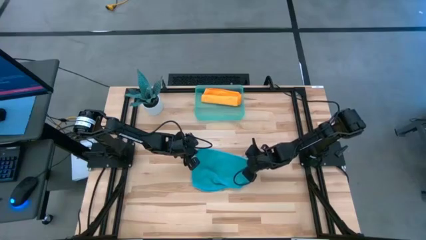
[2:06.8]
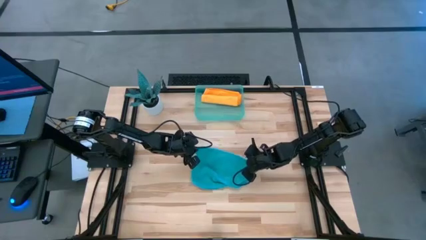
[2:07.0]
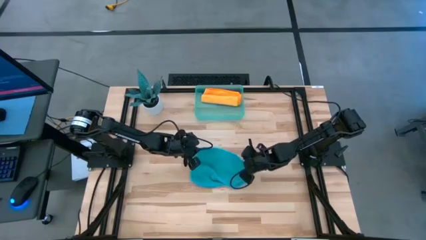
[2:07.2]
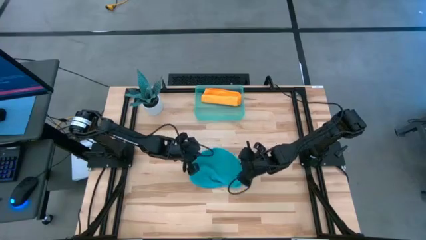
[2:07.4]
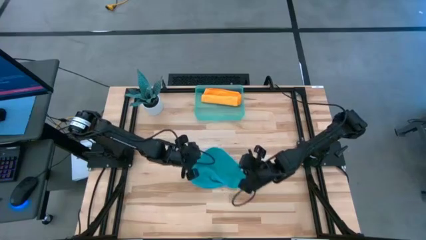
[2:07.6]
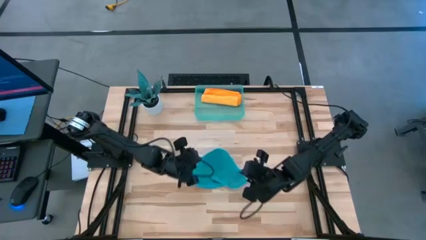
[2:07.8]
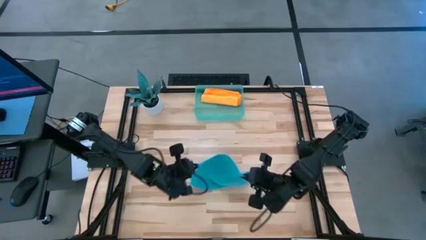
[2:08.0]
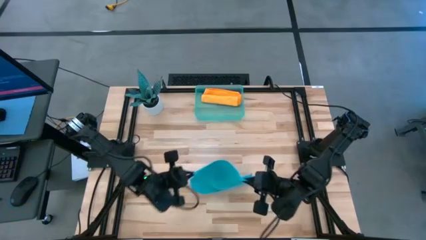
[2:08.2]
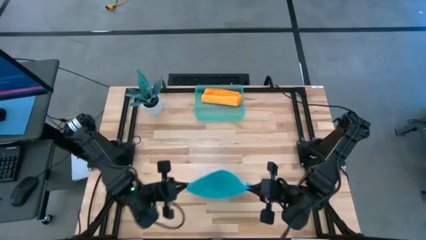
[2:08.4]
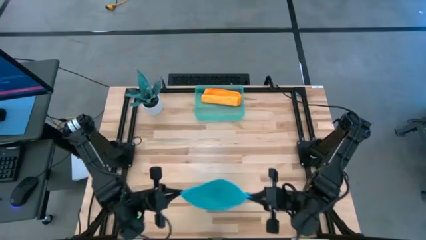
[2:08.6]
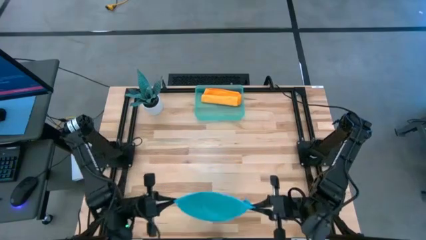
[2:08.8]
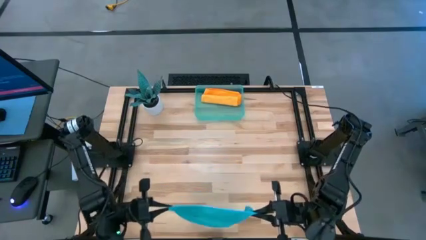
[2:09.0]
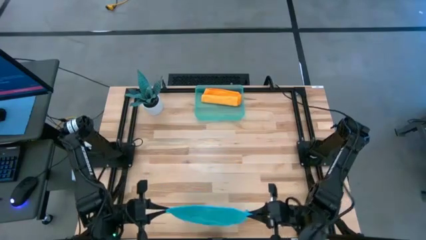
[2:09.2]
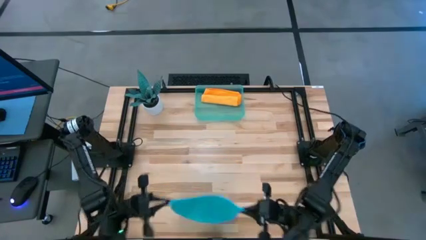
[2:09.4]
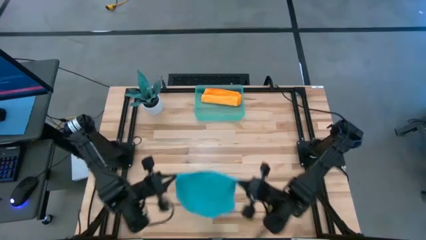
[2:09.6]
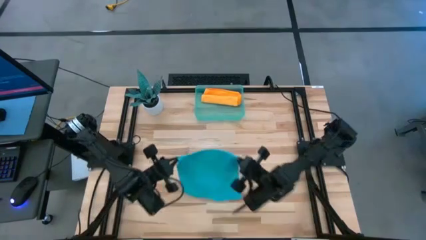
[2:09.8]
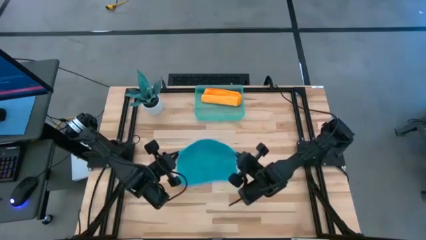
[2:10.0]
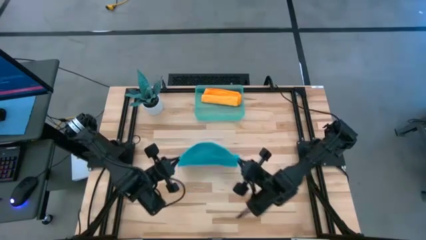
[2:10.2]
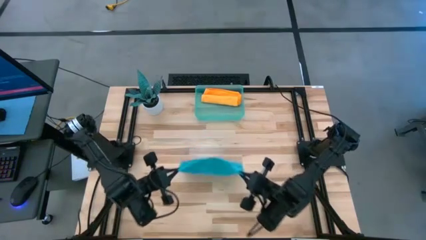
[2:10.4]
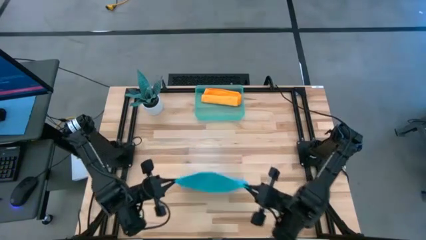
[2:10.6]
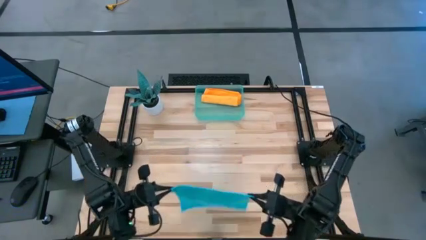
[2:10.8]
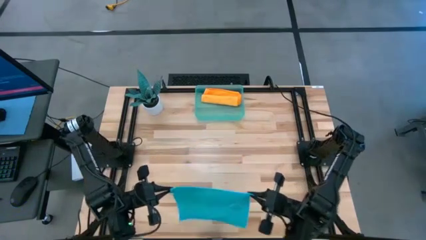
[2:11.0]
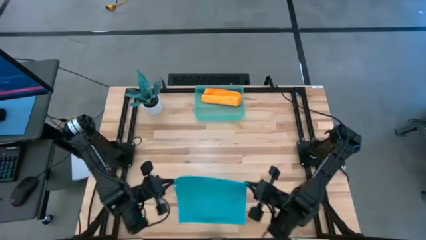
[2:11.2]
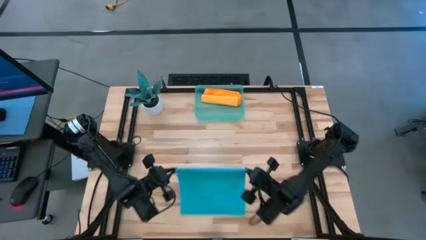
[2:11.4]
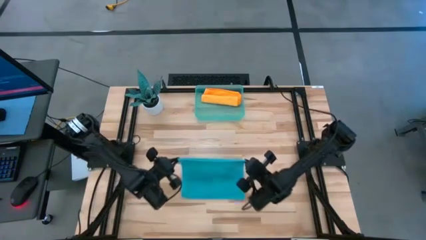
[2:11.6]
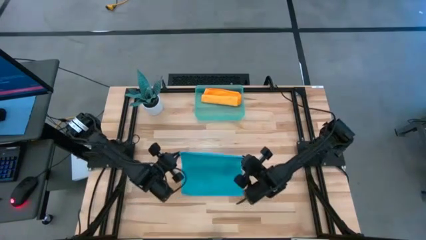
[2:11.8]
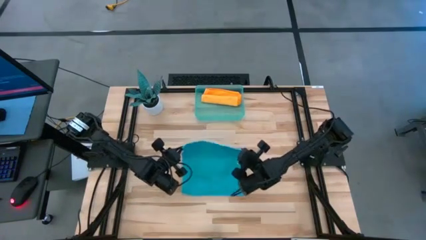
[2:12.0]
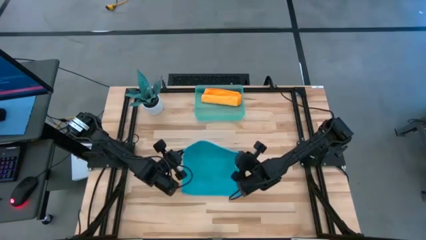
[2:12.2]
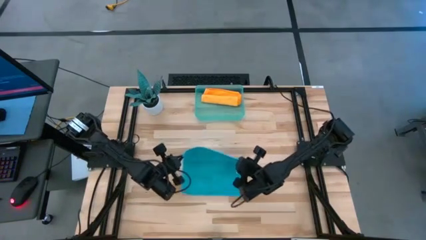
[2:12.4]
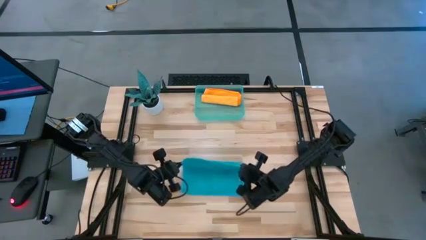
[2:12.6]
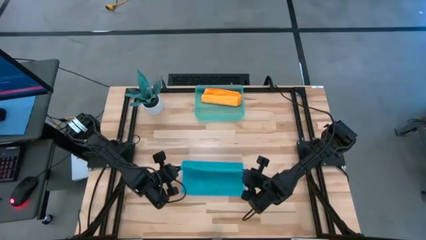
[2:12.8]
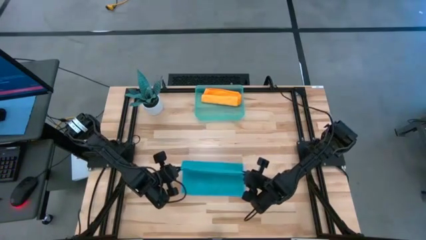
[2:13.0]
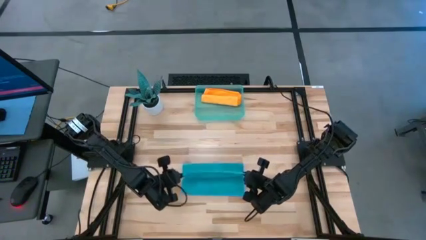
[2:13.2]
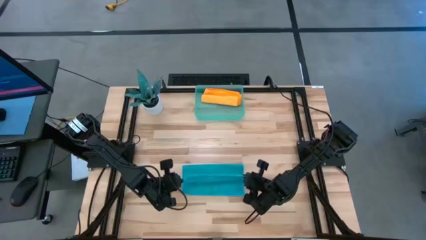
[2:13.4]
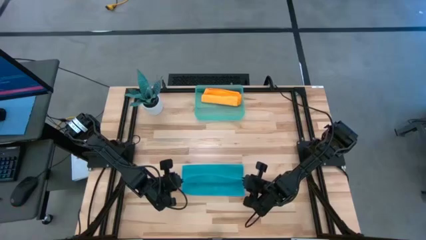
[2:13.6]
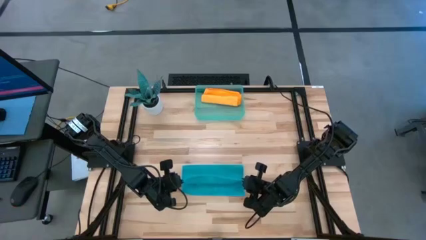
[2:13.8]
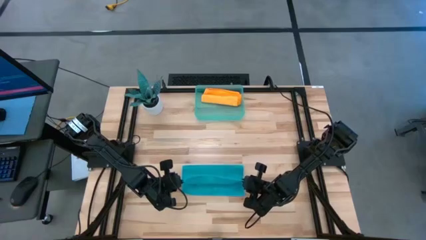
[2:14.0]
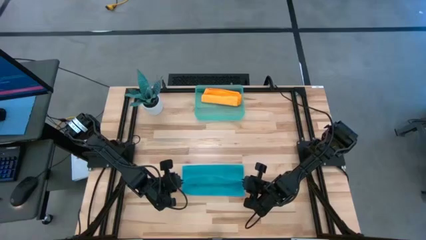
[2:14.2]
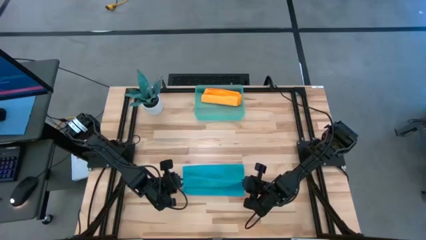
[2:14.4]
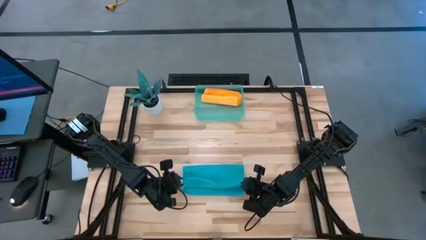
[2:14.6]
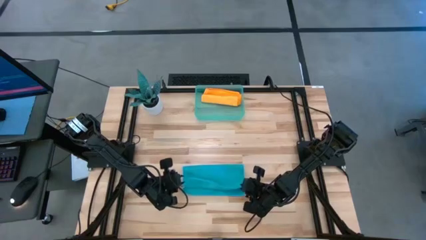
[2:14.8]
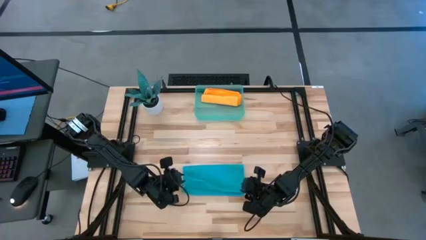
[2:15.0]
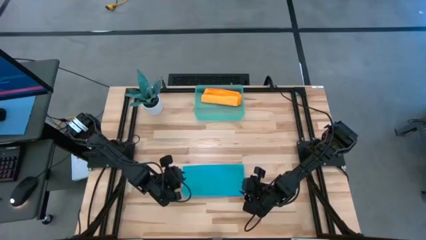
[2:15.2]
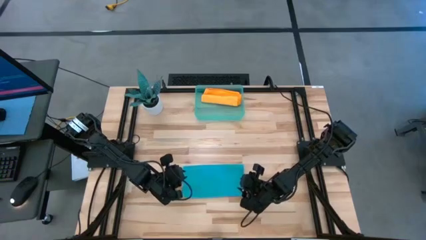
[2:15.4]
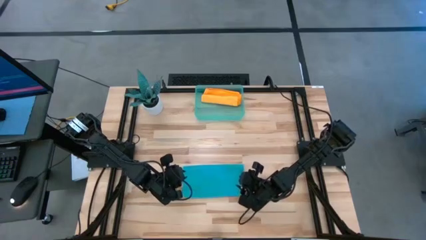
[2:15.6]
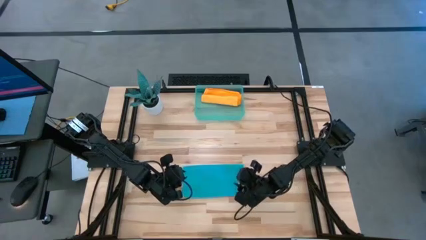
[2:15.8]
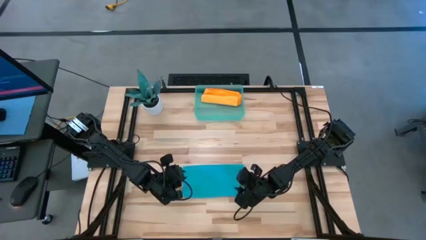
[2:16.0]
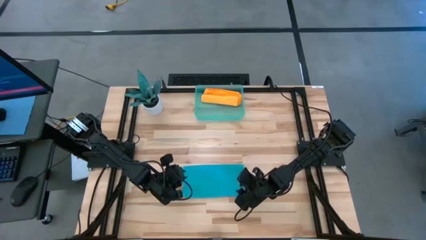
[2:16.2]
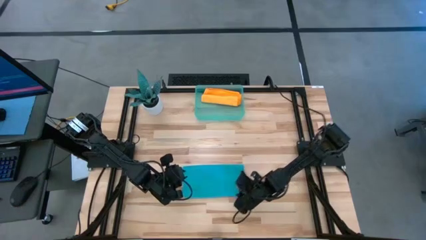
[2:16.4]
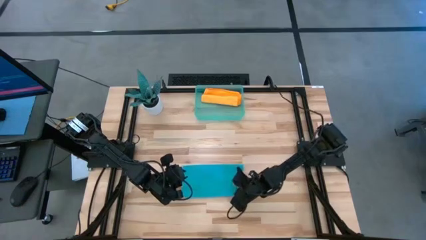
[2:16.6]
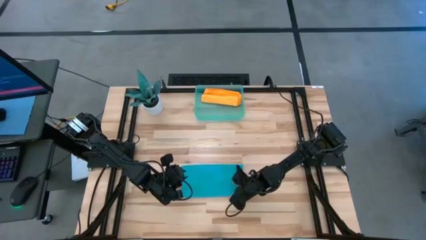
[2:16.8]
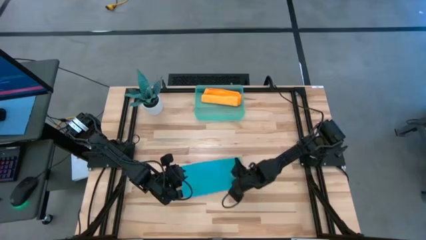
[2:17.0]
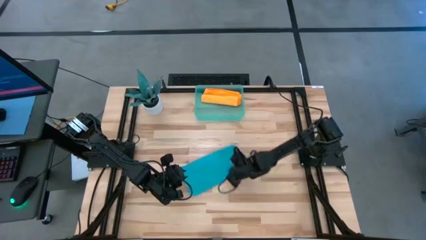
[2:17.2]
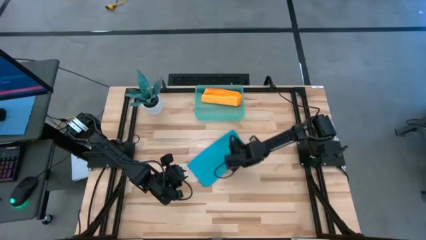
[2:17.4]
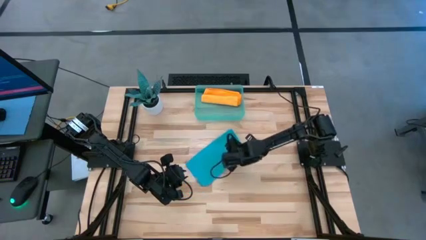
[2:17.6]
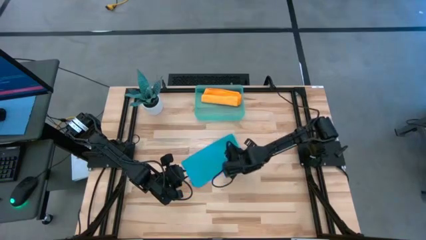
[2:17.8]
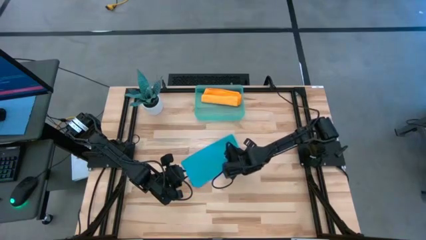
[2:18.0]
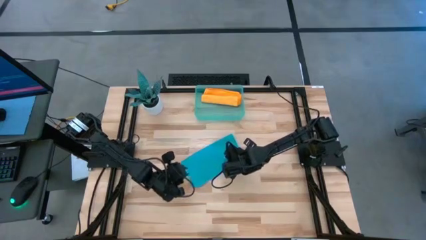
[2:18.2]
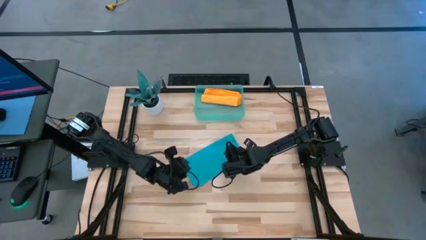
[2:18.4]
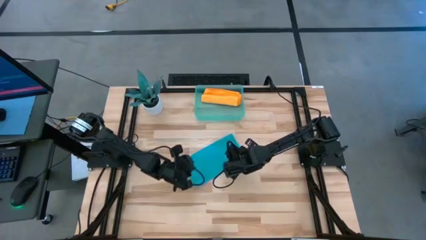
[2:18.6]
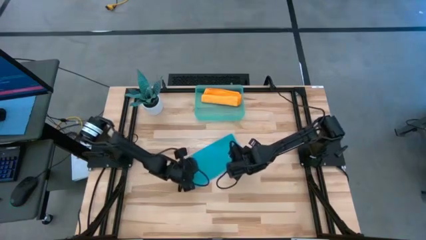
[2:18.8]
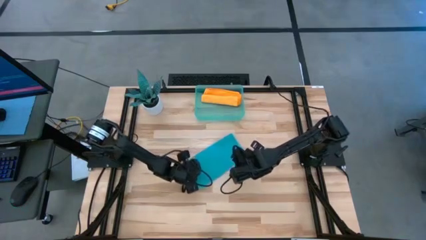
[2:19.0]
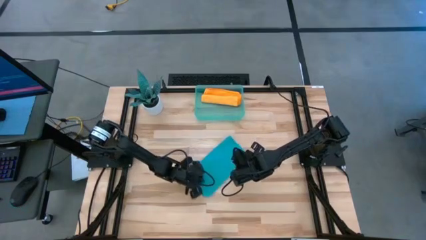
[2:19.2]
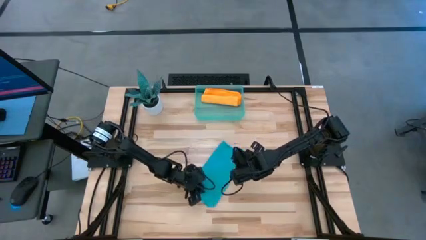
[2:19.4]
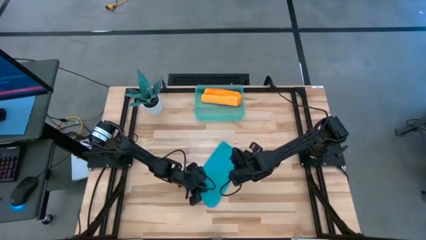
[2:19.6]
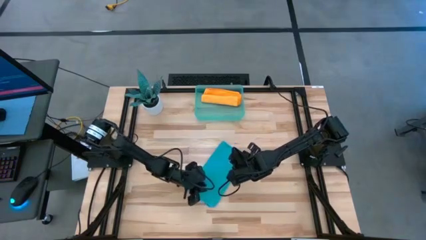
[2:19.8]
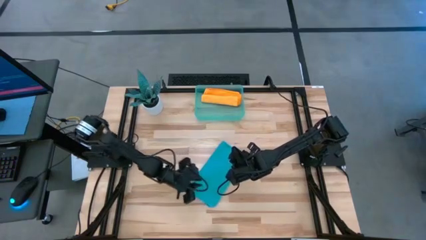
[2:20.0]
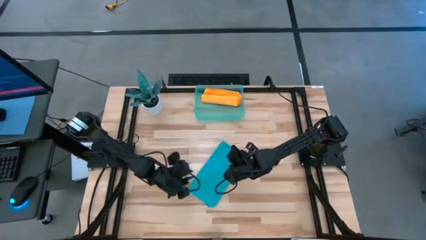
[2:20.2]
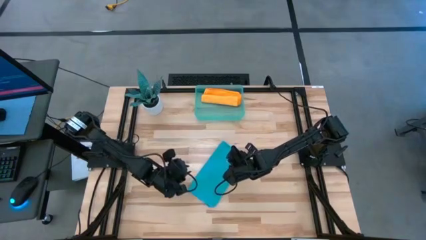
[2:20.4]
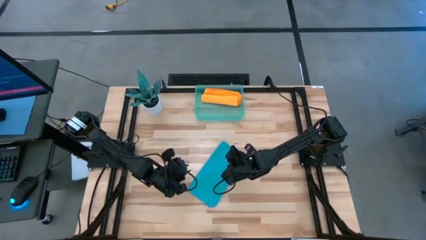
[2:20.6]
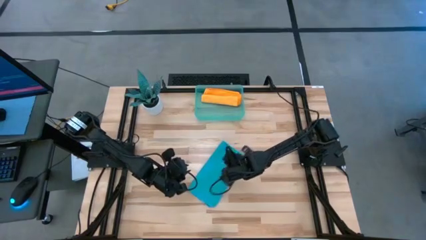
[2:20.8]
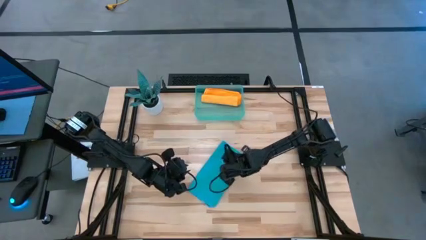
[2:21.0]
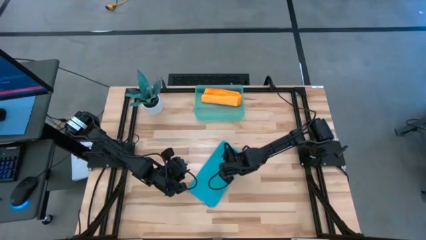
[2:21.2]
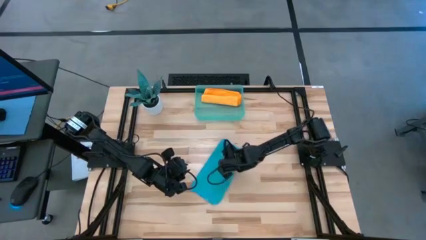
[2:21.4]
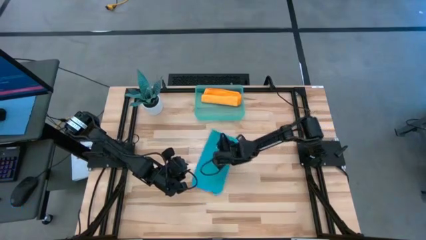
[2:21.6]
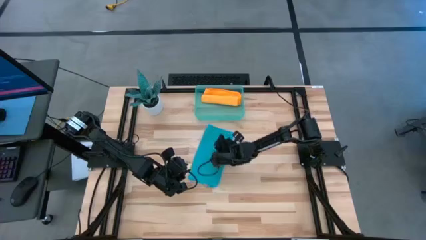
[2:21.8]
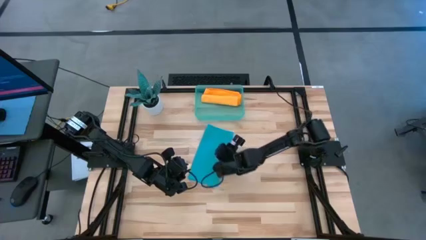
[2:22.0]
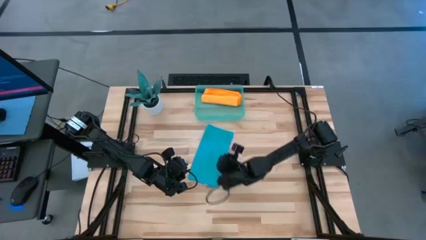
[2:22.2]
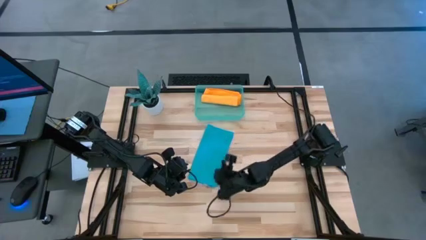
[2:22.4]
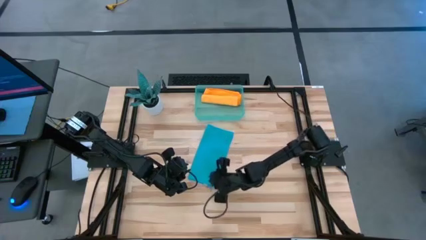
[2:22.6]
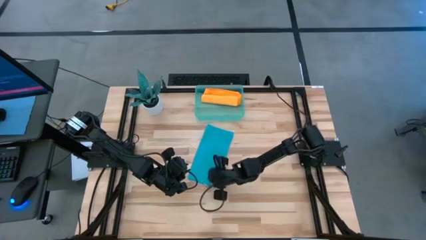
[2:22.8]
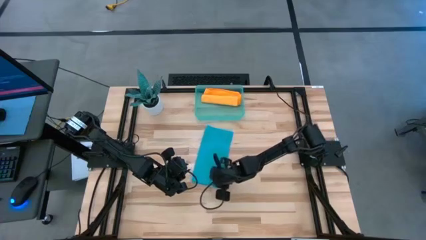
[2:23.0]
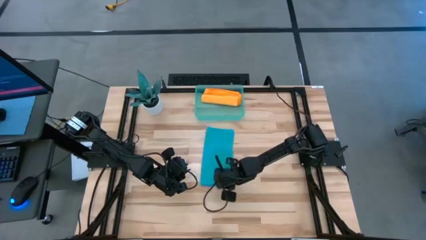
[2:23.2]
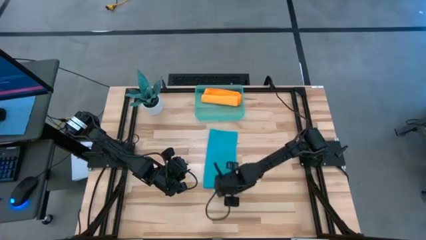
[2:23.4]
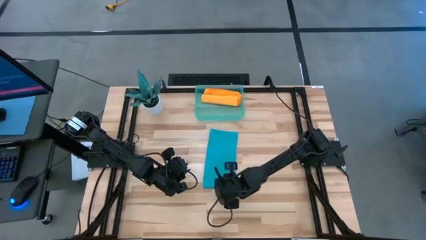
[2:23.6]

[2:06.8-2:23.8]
Task: Roll microfiber towels into tight, uniform cylinder then place into a basket
Roll the blue microfiber cloth
